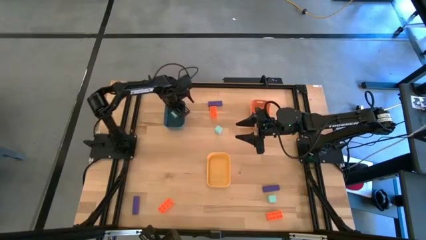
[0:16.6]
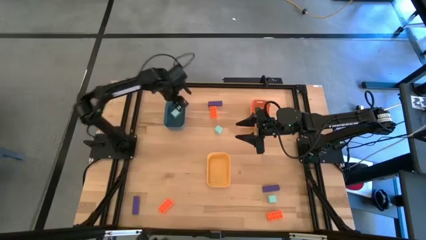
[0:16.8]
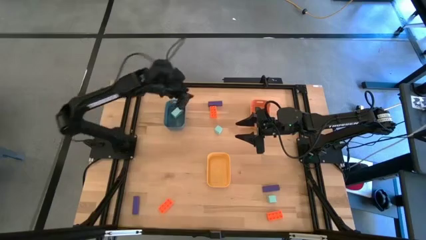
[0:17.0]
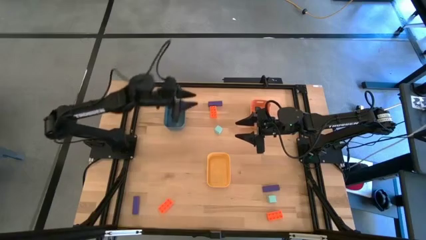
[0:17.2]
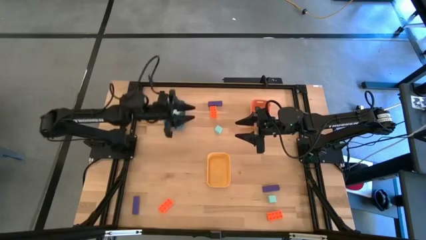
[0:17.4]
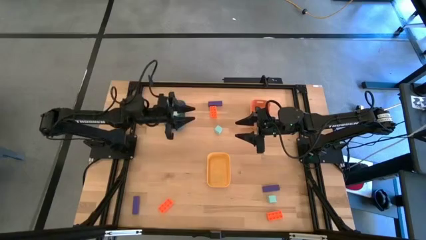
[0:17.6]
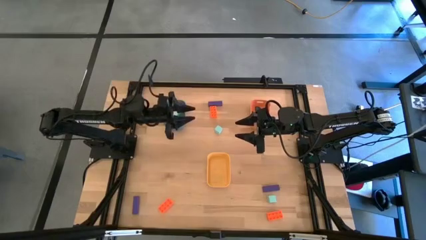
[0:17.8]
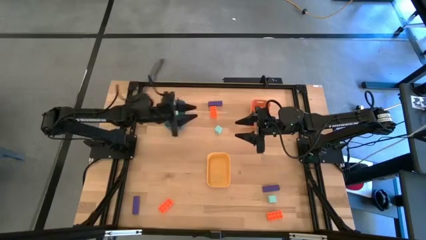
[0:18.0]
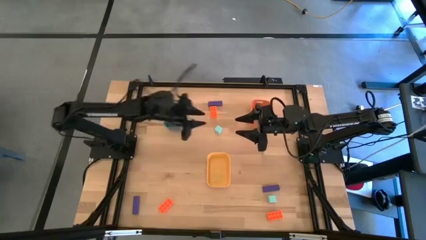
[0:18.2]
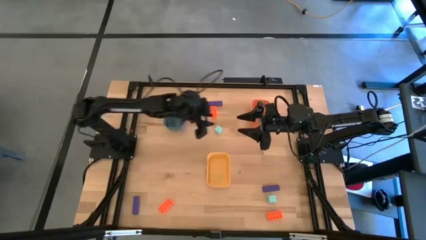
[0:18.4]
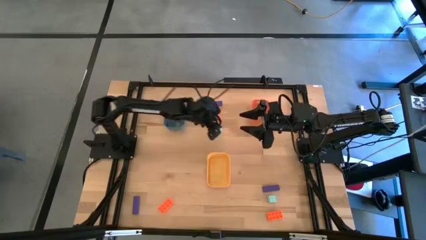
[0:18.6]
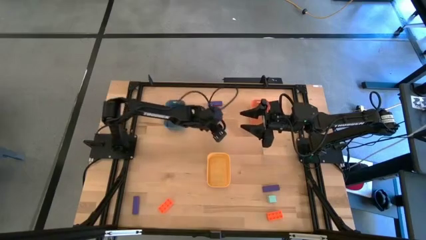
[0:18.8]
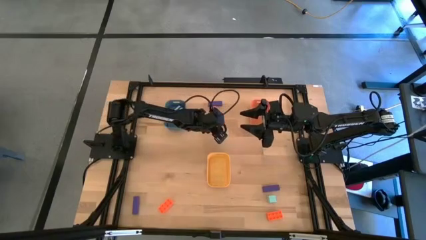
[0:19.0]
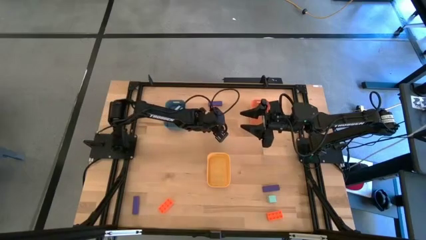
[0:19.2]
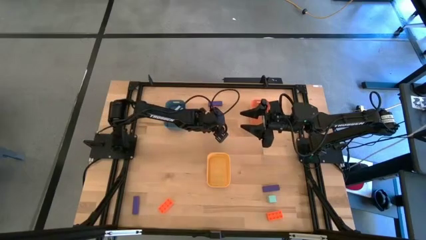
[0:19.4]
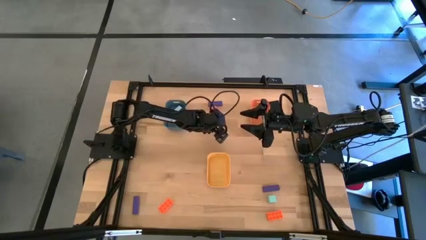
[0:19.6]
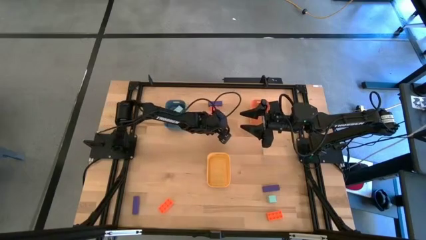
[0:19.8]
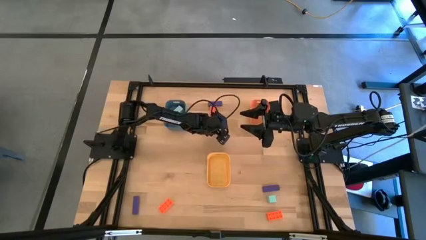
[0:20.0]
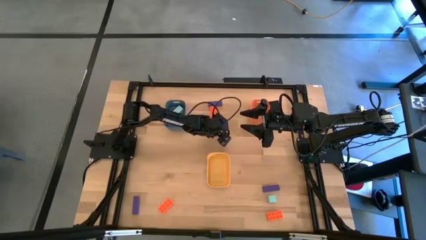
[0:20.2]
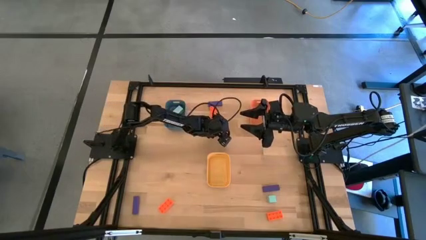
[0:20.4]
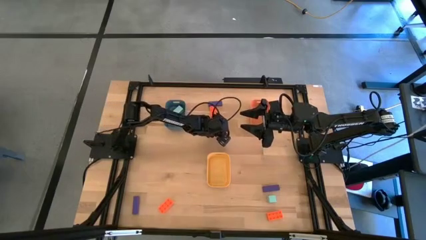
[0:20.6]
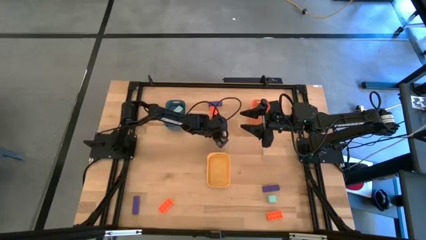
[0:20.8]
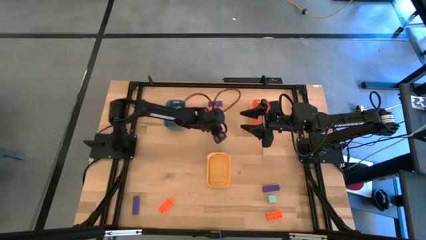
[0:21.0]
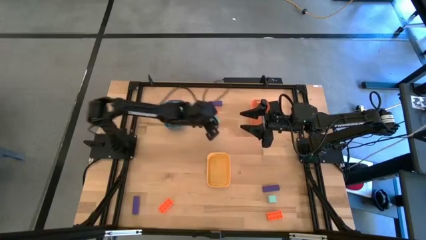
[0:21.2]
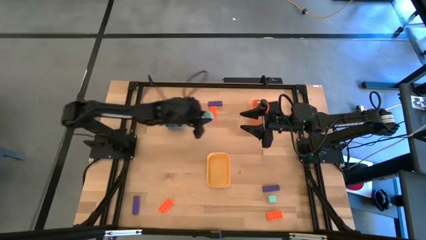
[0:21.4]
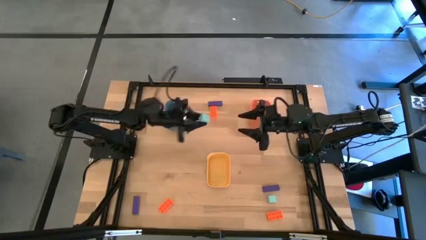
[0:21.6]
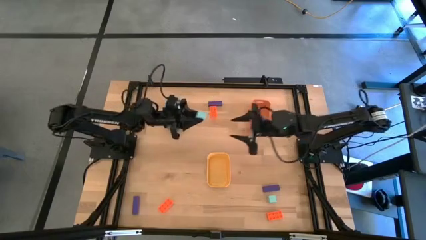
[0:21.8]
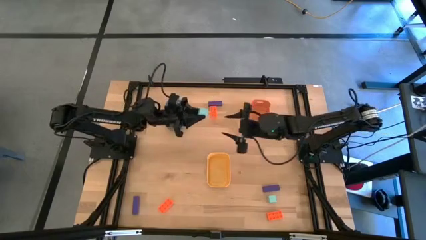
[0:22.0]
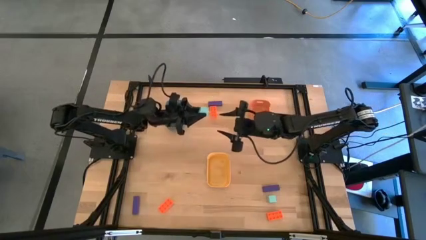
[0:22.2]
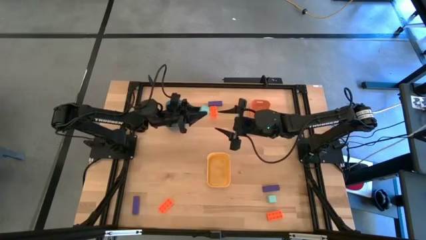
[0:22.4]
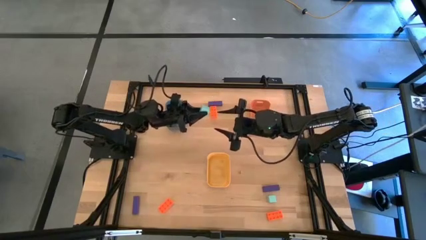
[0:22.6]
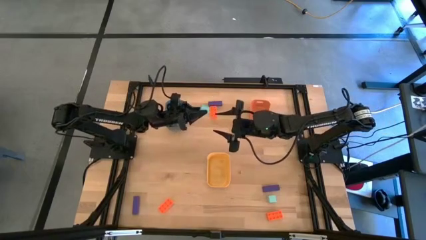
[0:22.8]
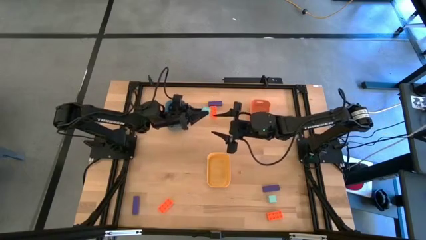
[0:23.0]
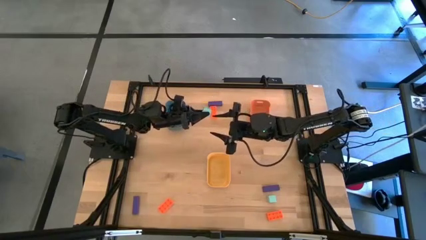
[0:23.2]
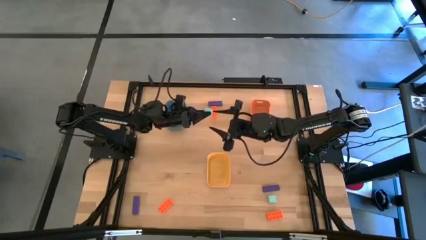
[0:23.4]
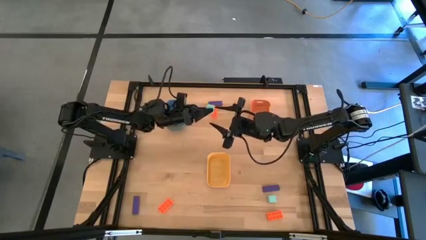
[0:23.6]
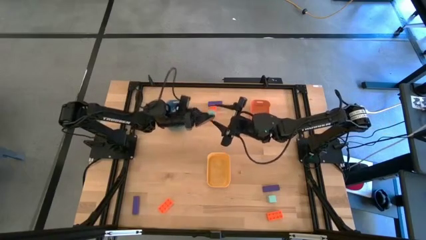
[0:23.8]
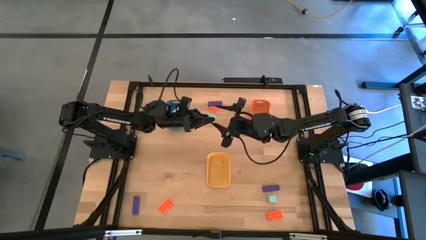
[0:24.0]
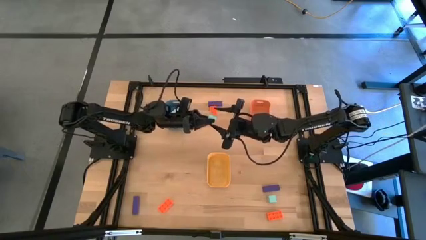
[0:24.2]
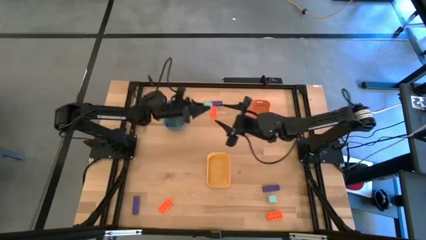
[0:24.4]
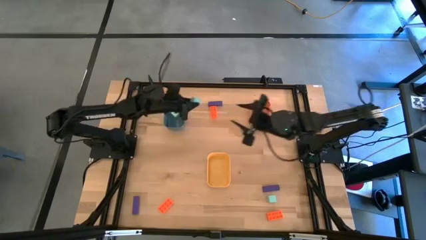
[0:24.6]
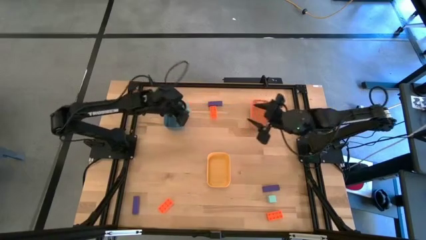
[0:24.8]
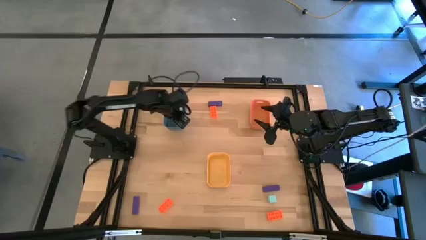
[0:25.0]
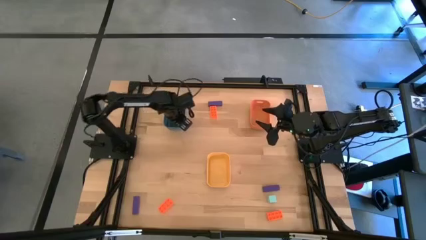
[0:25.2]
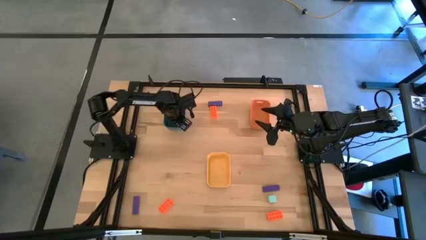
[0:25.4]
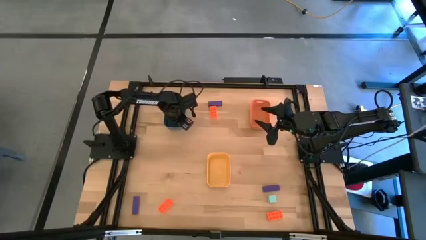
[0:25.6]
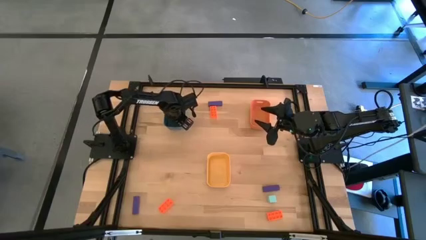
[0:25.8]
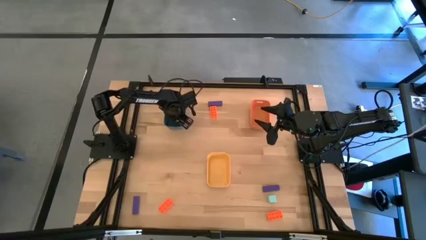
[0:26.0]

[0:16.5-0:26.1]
Task: Sort & place blocks by color
Put the top light blue block into the blue bin

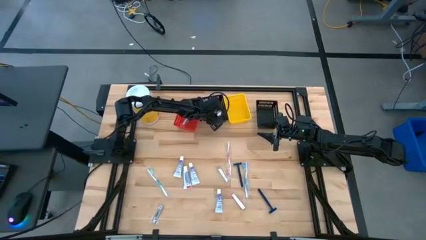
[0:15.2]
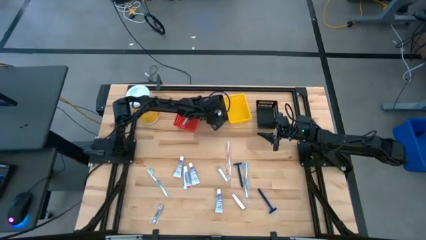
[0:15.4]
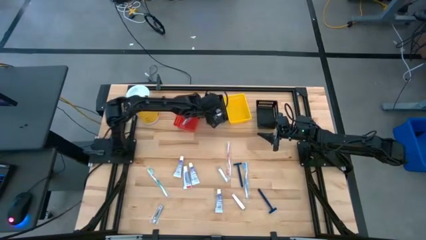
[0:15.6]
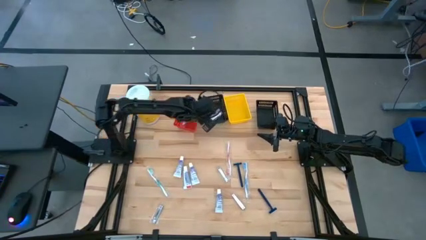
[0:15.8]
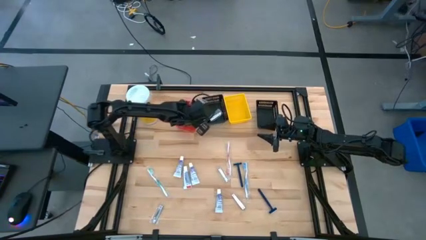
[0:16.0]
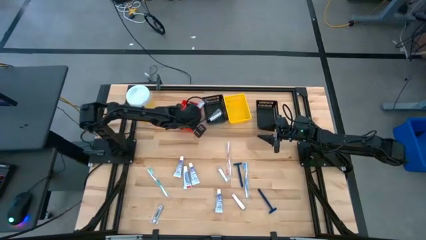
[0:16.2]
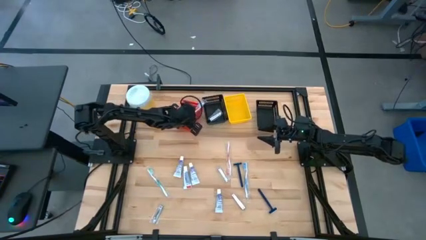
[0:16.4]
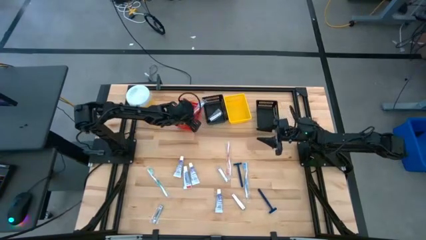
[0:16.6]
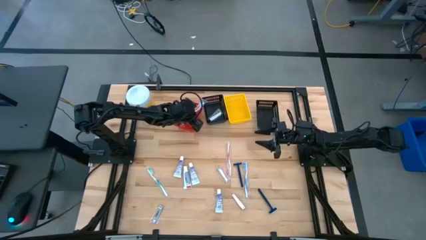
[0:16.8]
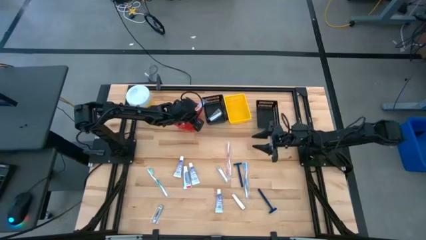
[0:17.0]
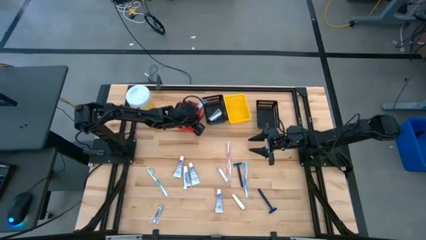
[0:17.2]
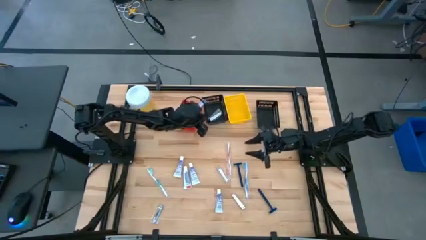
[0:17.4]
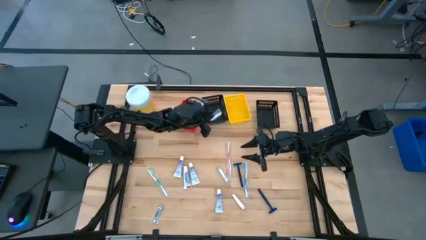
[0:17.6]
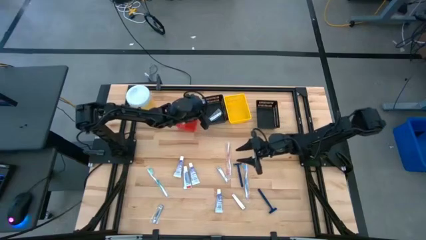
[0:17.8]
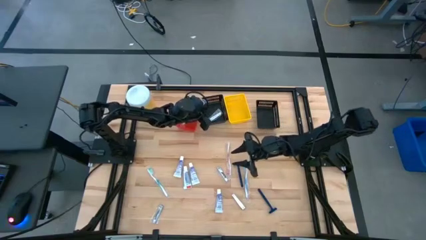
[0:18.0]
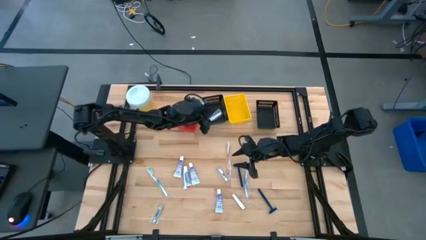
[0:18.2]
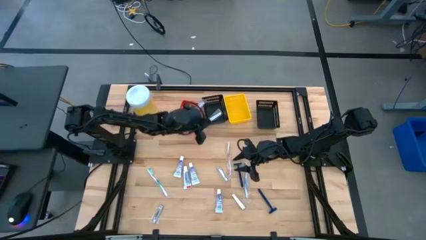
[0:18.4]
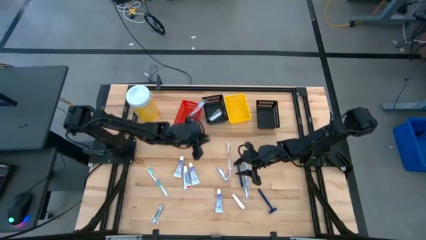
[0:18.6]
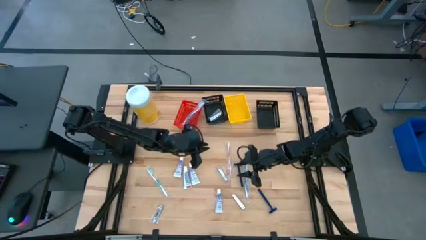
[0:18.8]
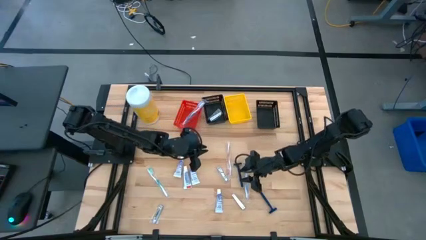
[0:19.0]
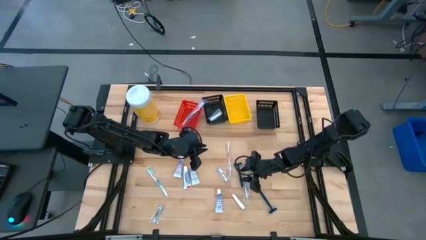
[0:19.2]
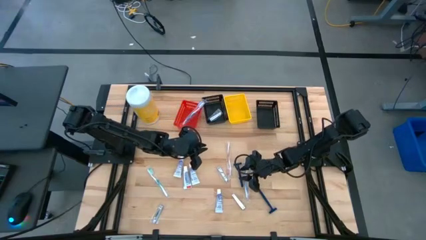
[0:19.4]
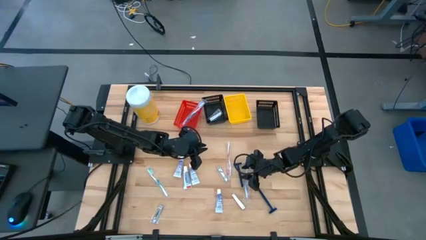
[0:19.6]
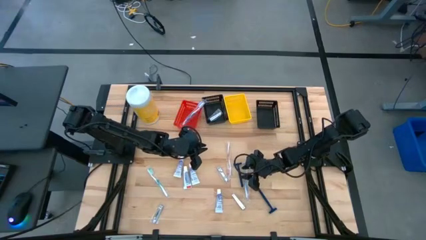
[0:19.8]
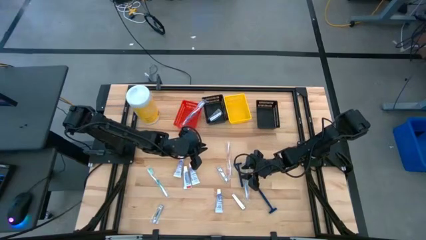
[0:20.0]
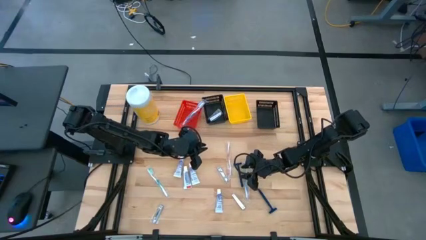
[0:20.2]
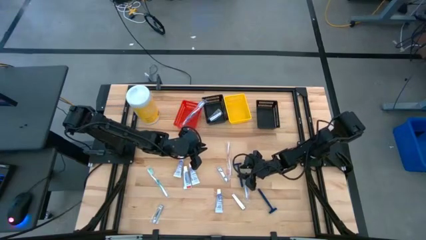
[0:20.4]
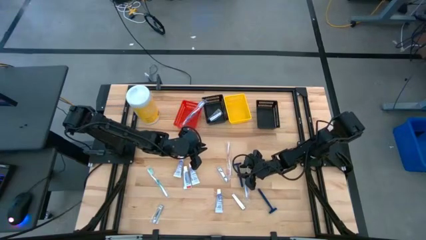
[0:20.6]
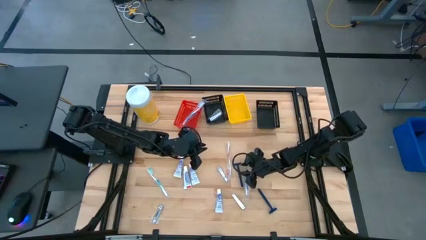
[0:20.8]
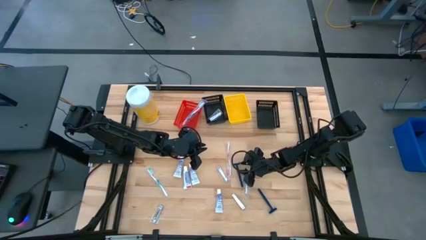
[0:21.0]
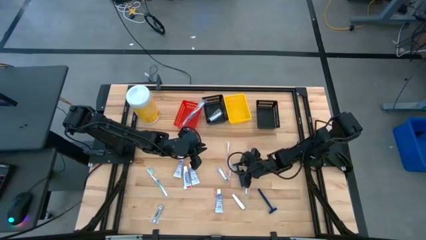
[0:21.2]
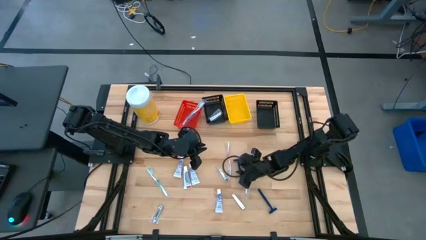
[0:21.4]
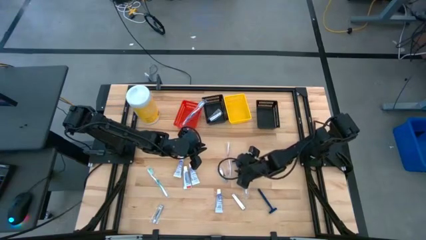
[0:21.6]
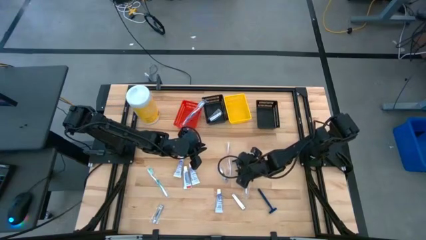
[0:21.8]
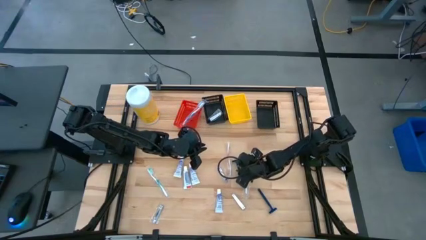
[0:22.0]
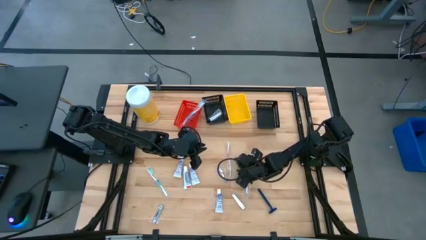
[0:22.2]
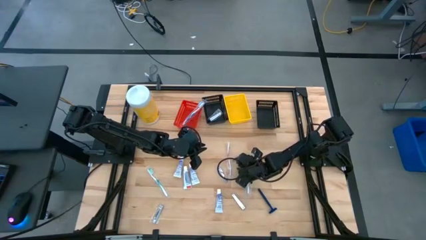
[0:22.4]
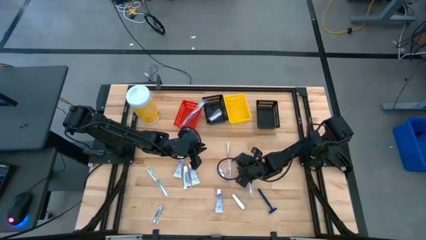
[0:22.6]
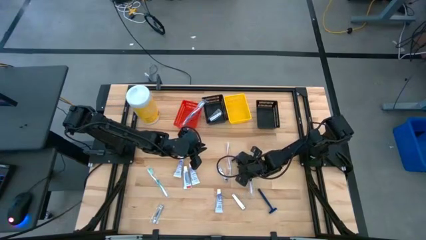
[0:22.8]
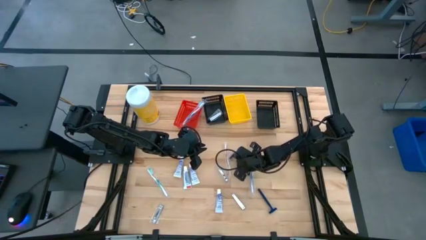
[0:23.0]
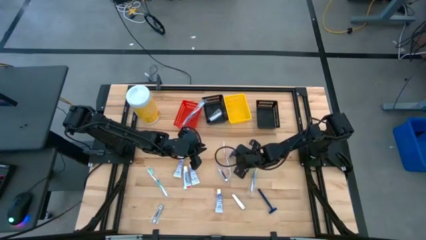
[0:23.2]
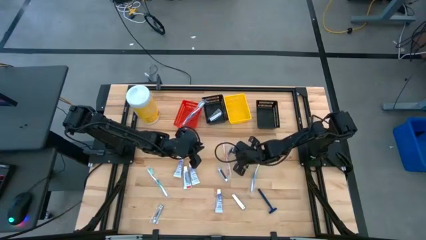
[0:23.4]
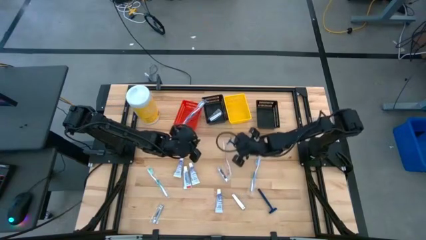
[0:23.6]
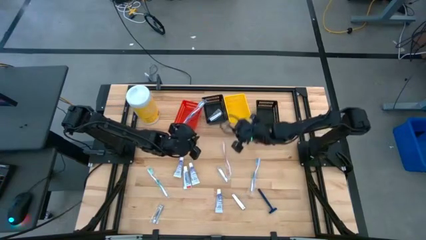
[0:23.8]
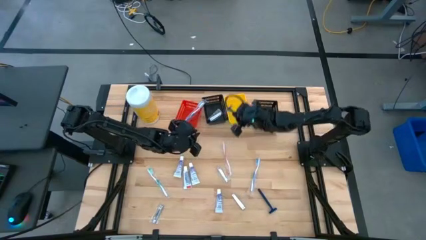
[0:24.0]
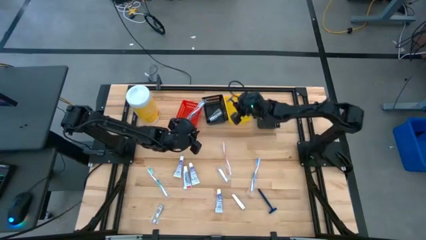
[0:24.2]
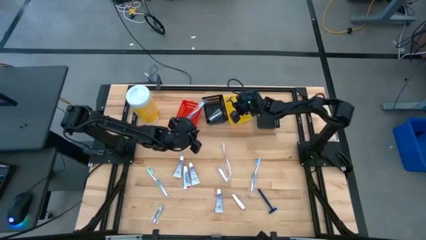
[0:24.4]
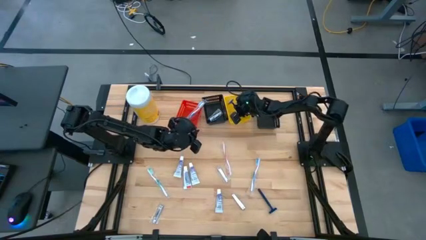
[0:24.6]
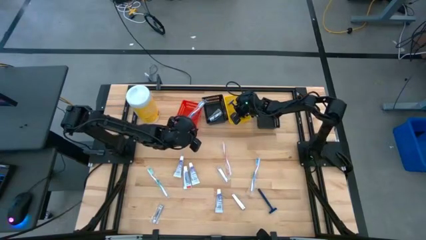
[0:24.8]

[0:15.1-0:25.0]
Task: Pick & Place Travel size toiletries
Put the blue razor into the yellow bin
